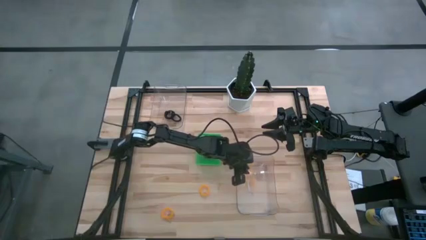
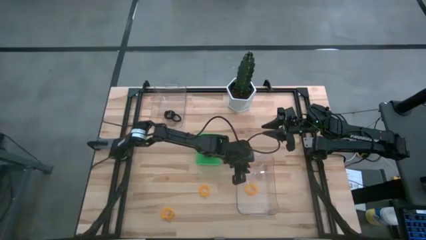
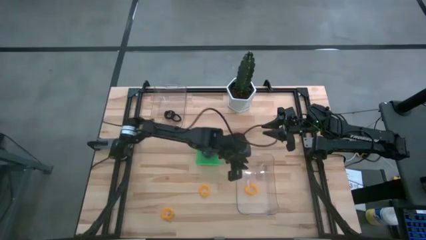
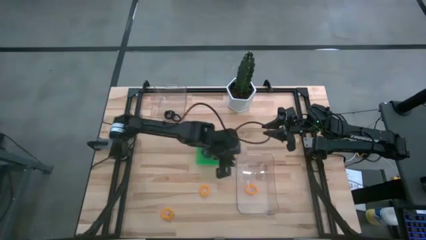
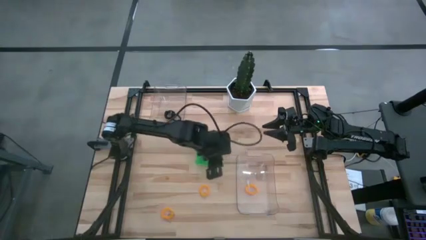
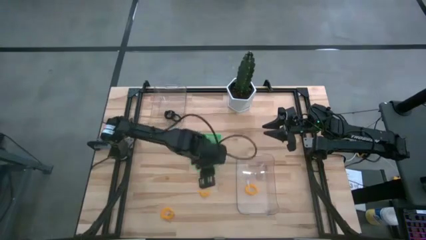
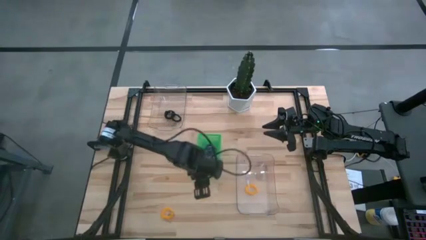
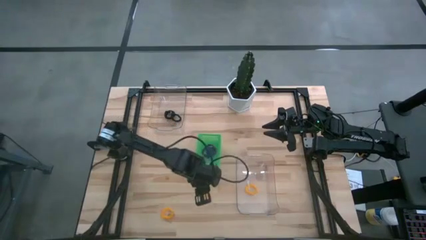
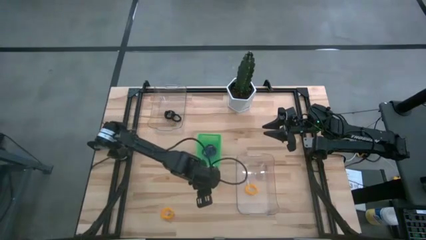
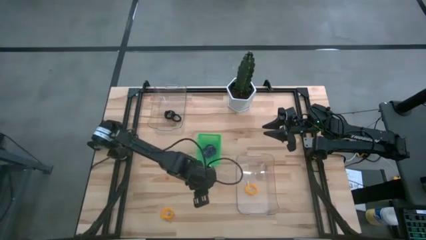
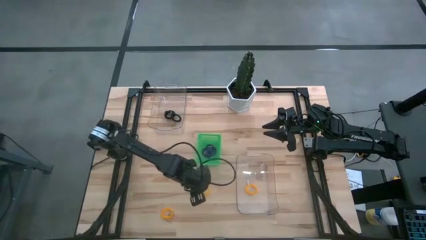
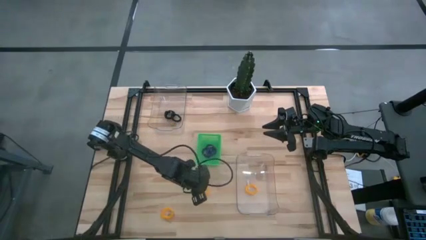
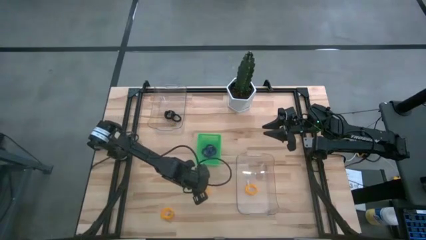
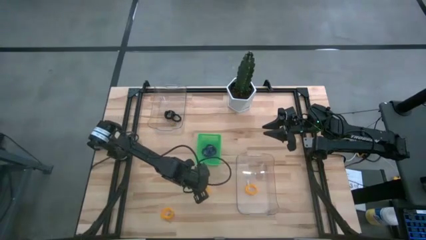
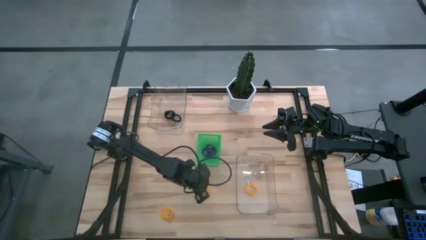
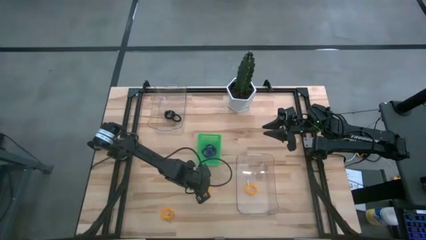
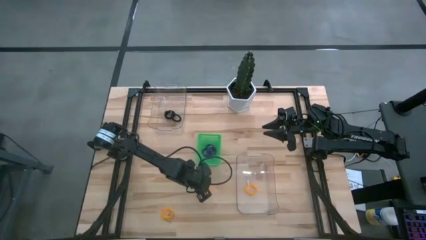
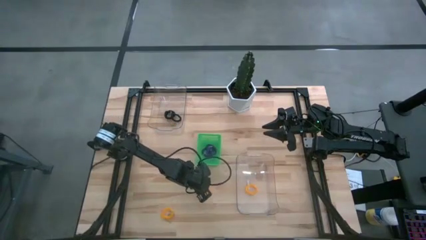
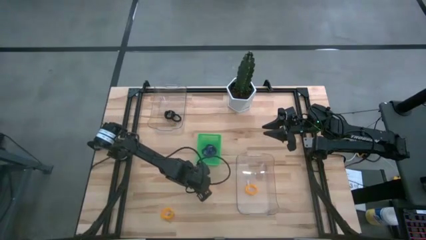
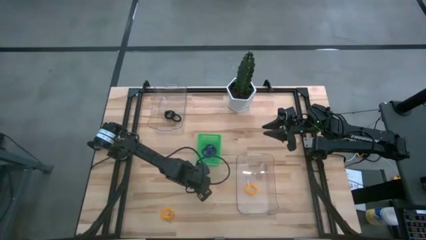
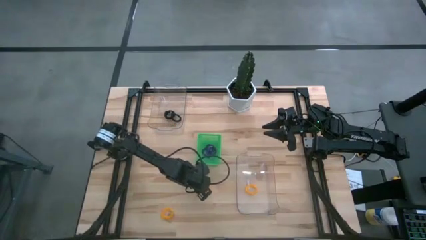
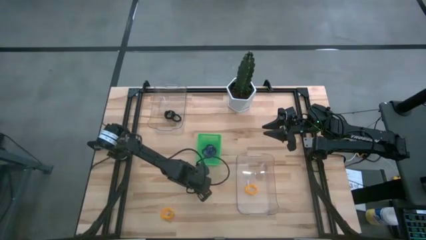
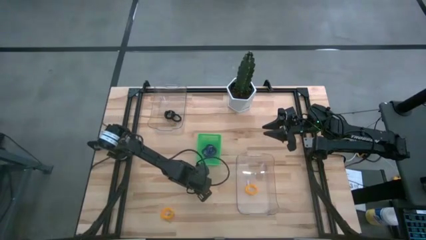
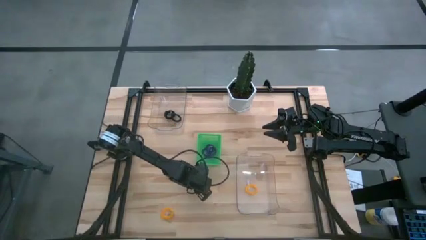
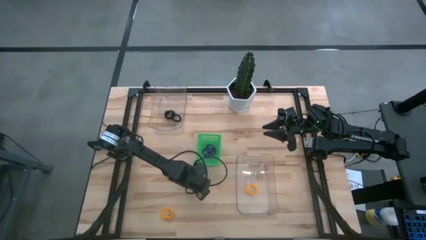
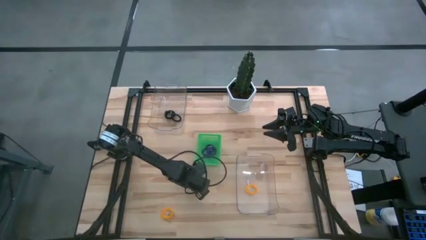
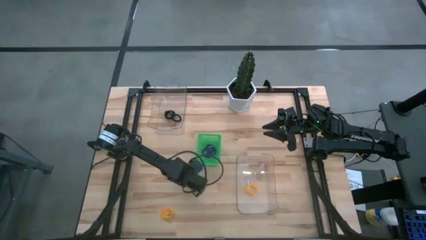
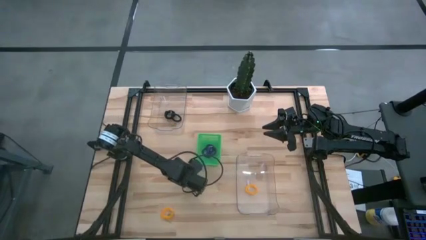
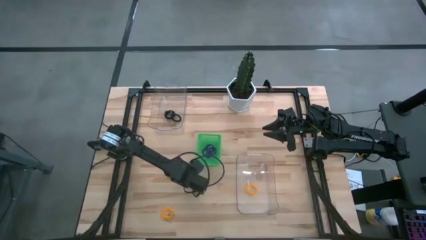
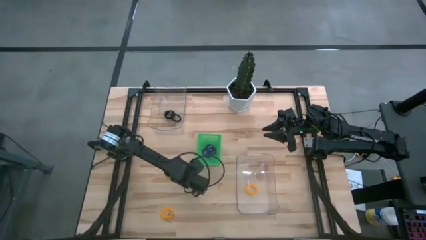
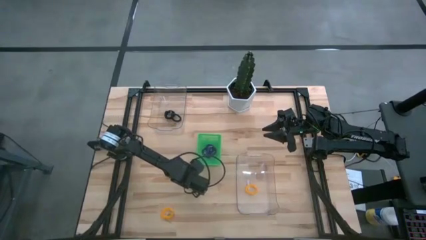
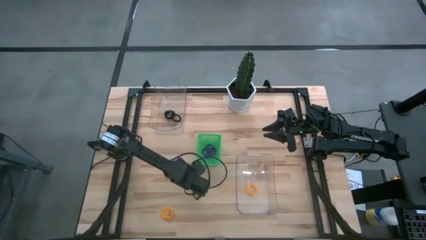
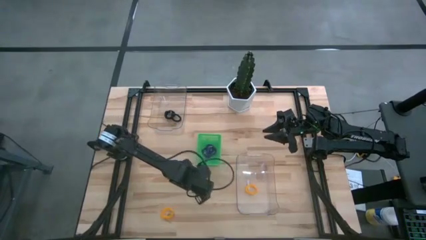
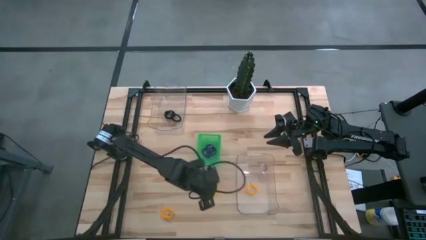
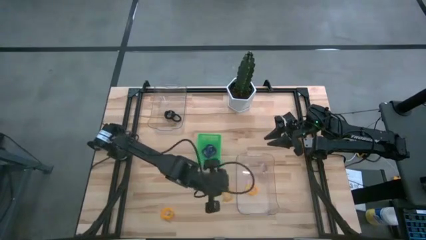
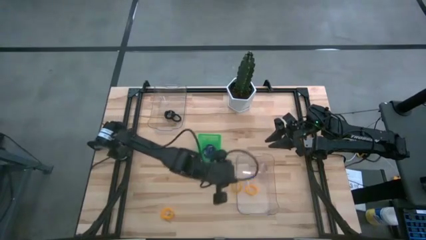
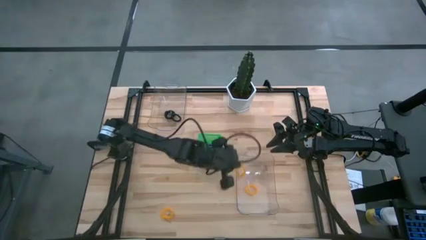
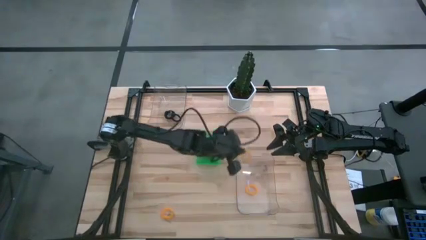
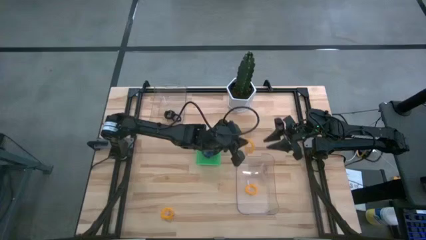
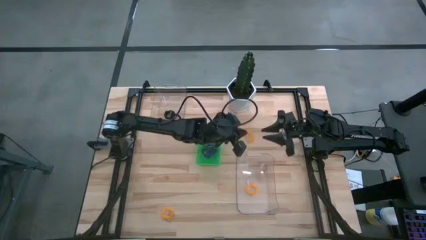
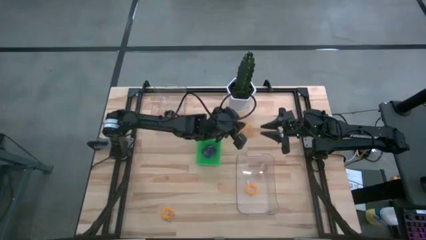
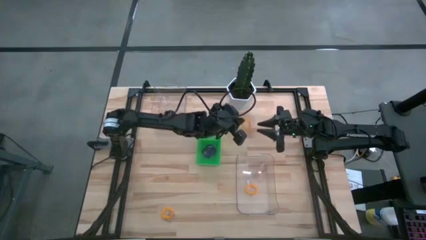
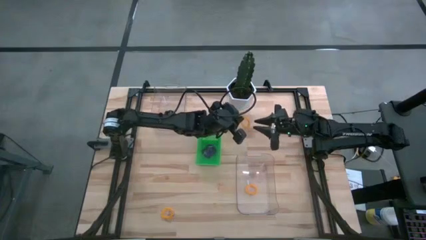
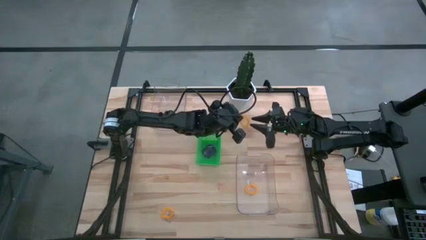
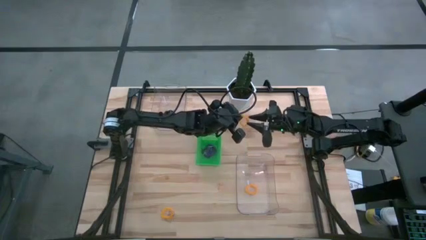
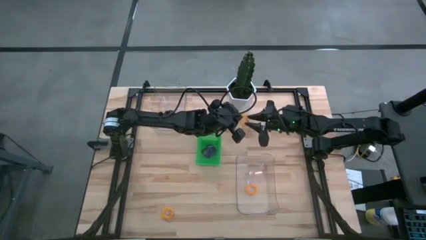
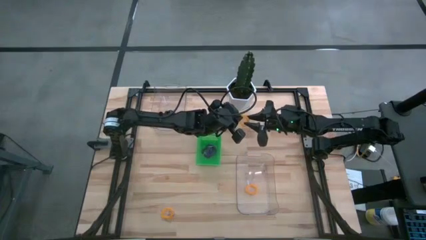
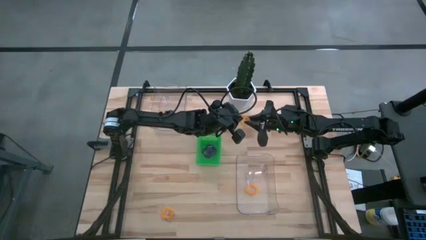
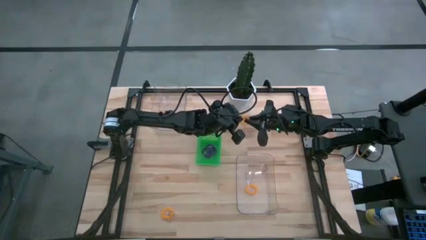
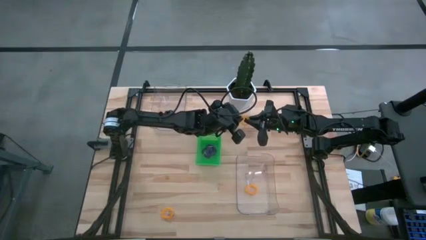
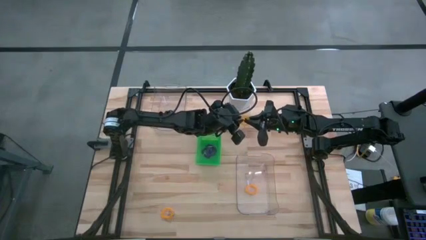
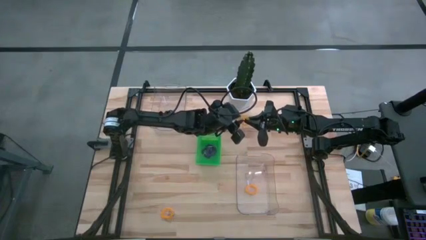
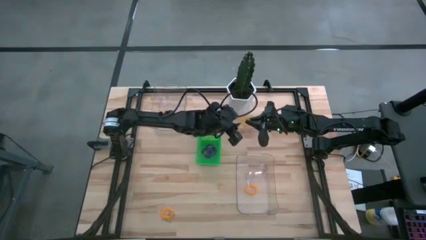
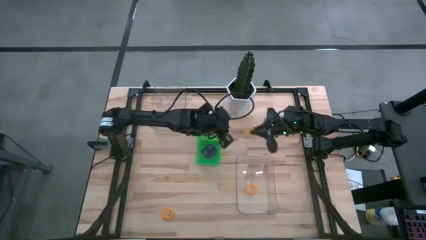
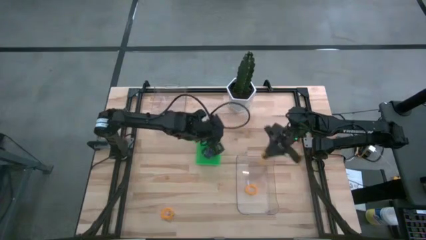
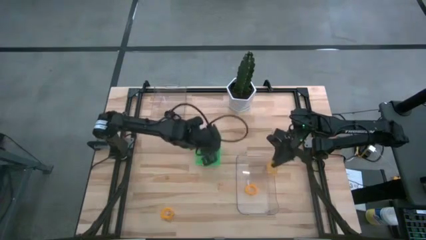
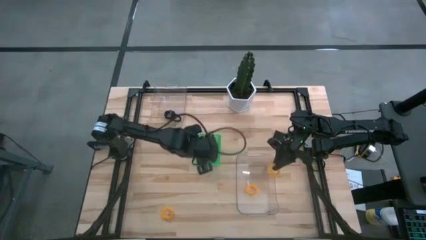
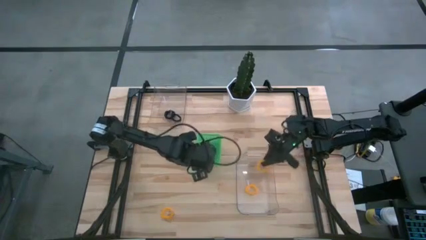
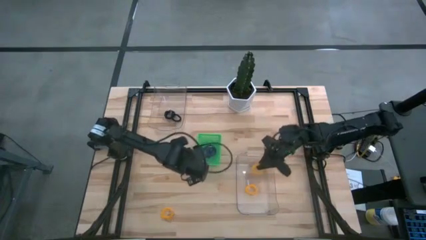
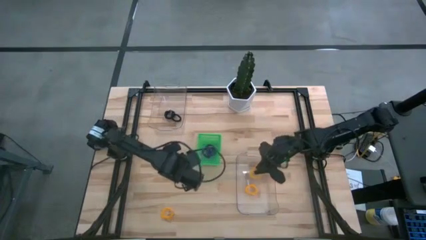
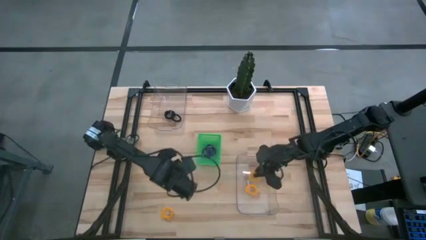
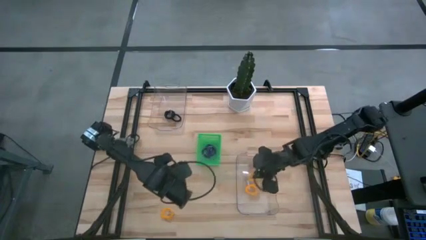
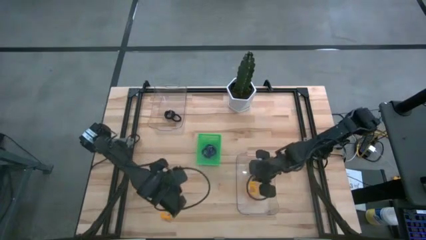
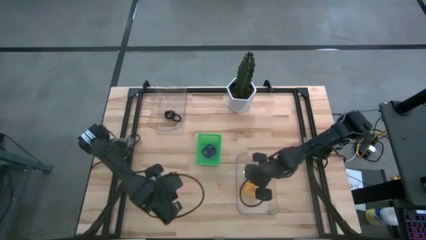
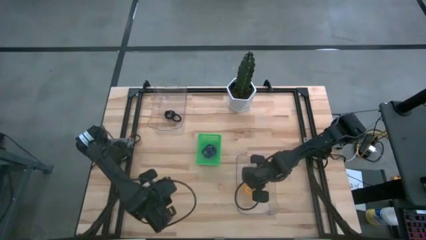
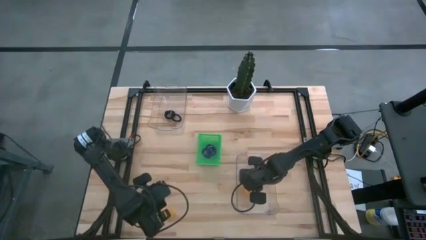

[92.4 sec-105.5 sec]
Task: Sort spring keychains
Put the top yellow spring keychain into the bottom transparent bin

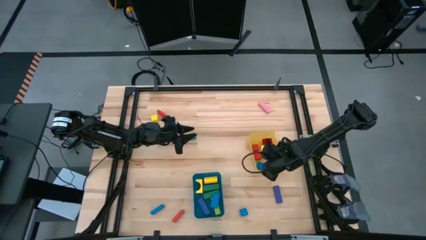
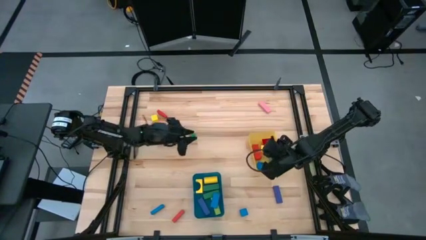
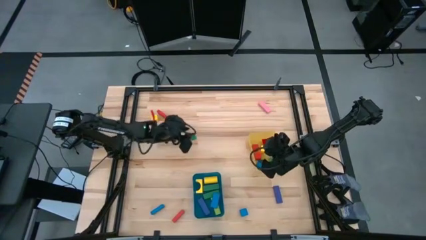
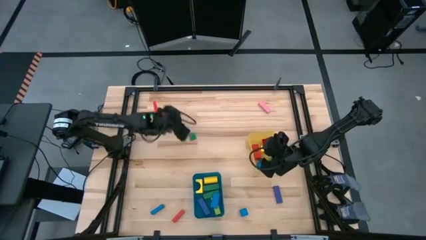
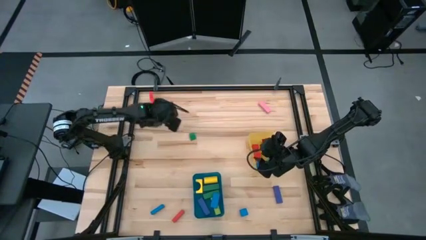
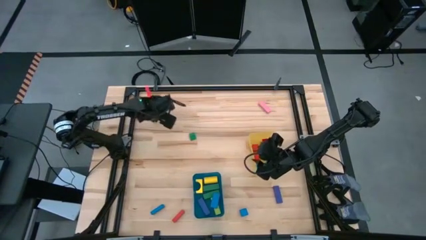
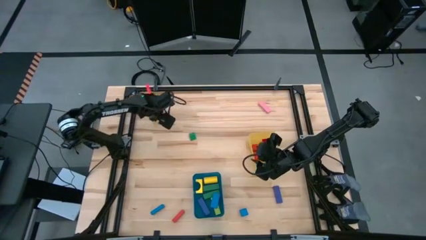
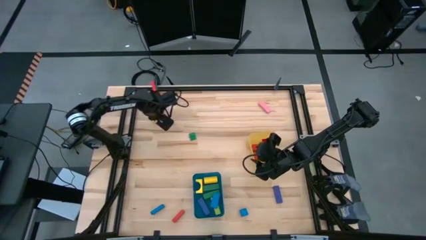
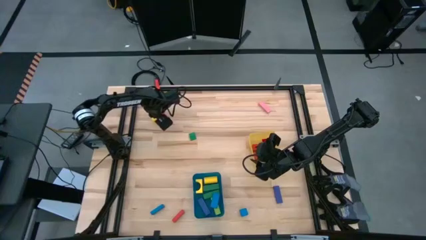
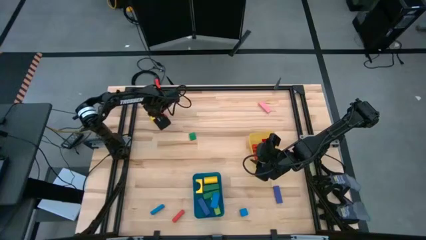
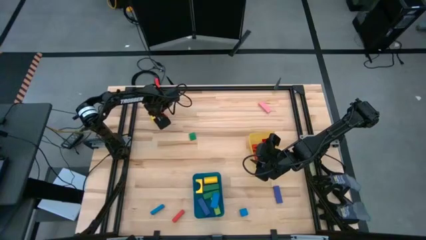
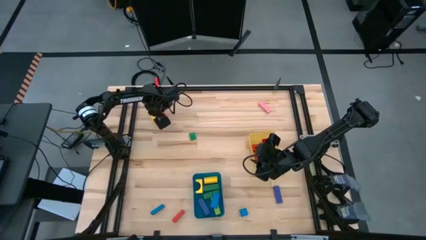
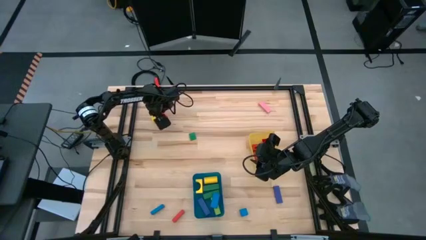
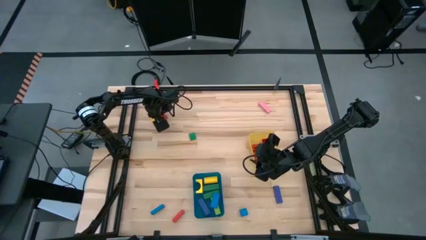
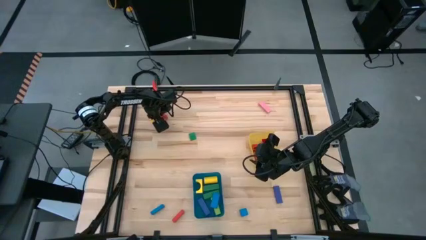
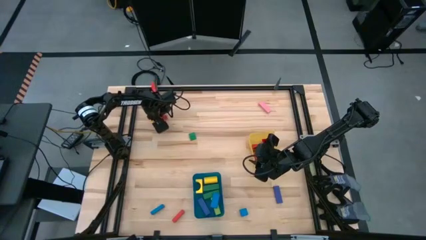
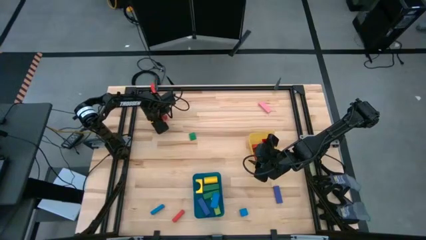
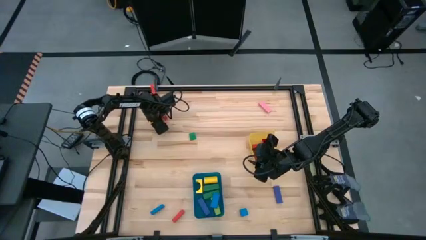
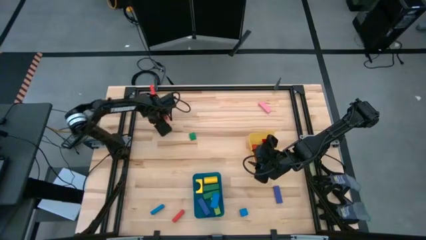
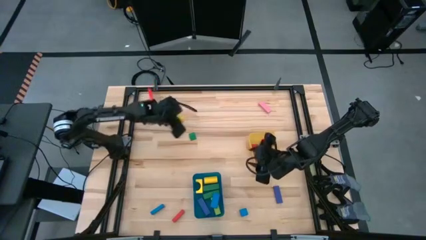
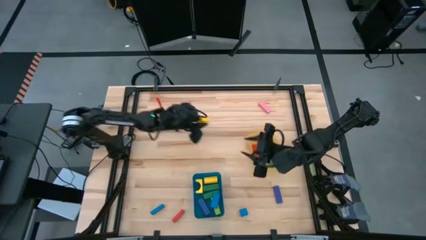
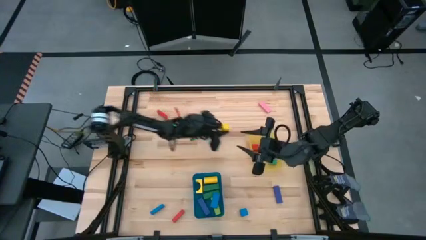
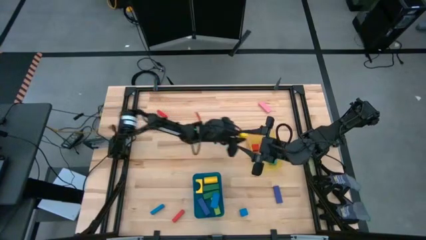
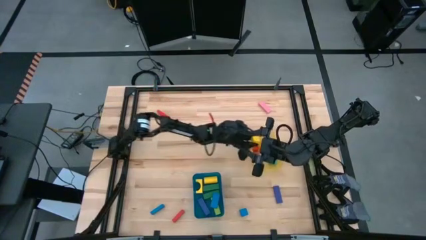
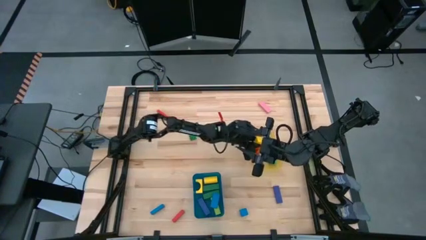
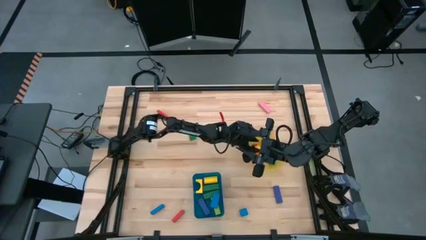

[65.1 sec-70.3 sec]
Task: Sort blocks by size
Put the small yellow block into the yellow bin
